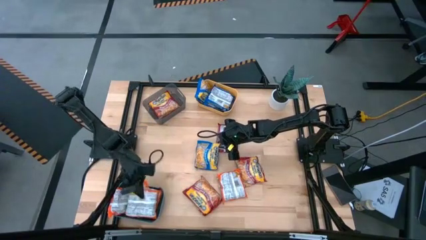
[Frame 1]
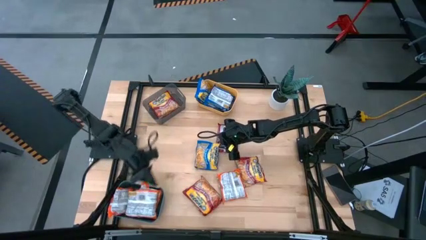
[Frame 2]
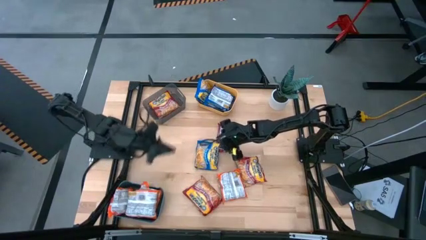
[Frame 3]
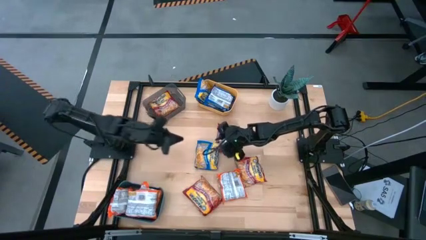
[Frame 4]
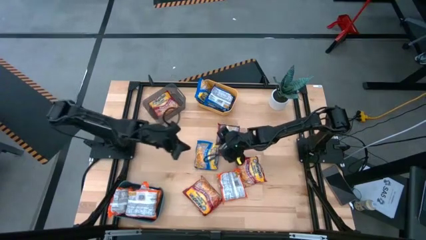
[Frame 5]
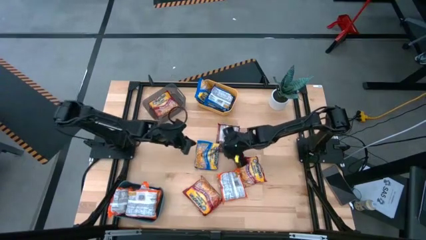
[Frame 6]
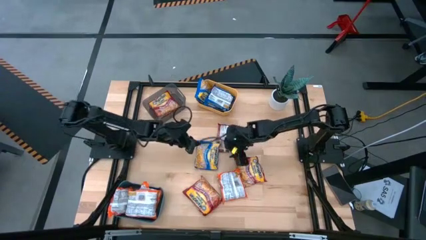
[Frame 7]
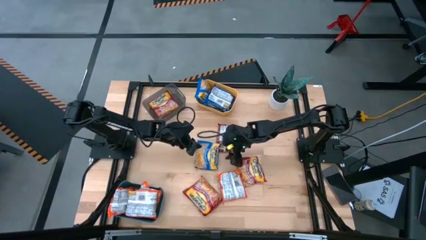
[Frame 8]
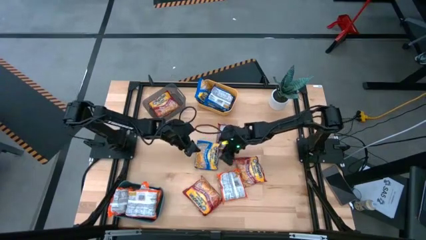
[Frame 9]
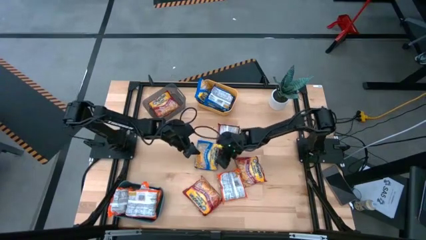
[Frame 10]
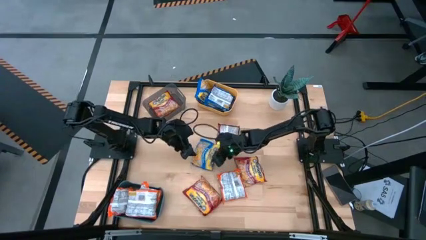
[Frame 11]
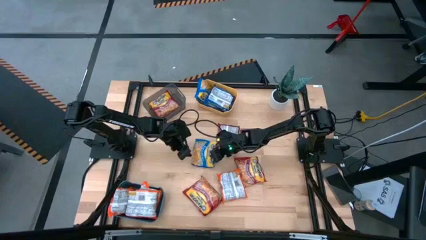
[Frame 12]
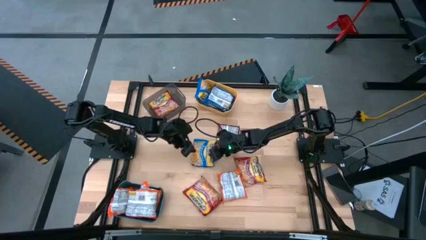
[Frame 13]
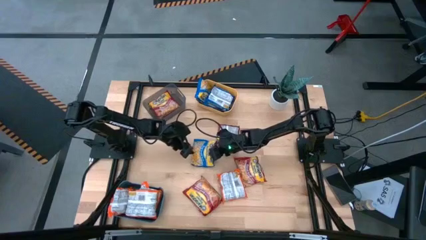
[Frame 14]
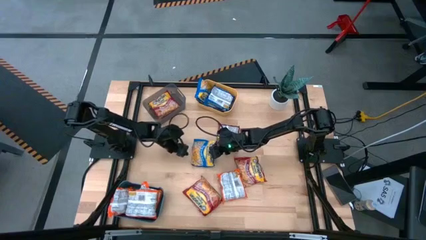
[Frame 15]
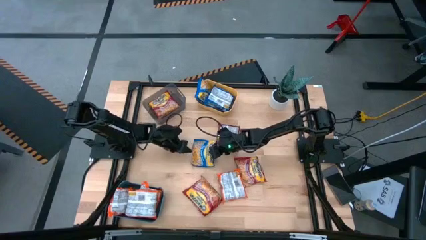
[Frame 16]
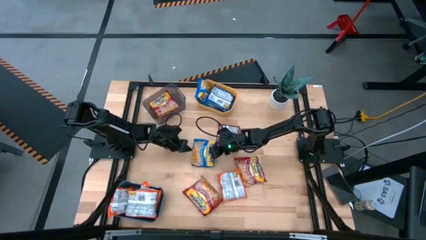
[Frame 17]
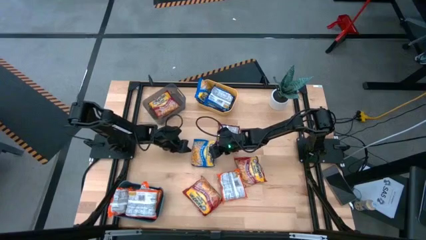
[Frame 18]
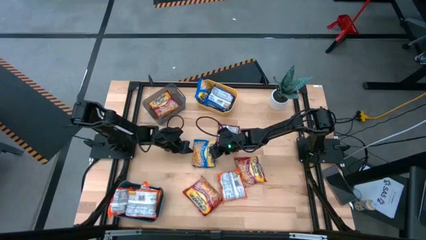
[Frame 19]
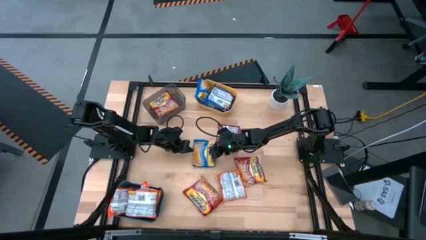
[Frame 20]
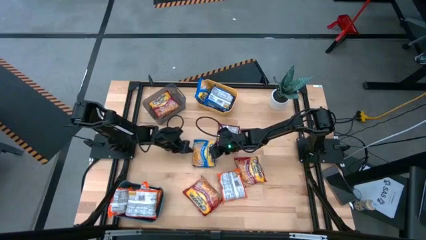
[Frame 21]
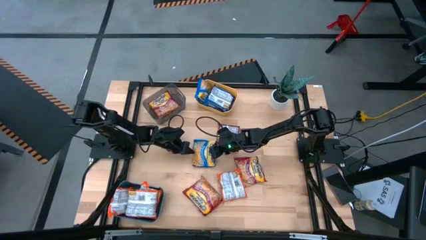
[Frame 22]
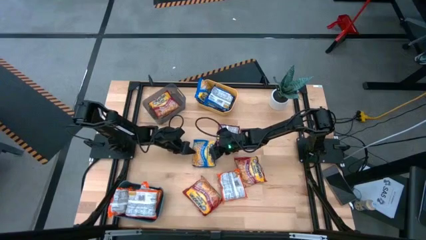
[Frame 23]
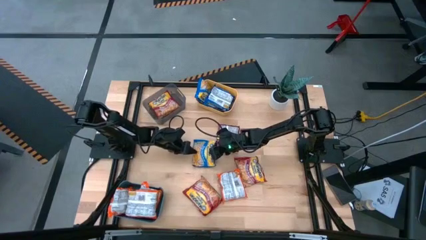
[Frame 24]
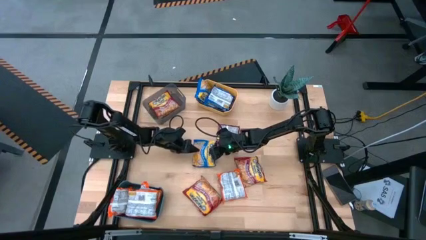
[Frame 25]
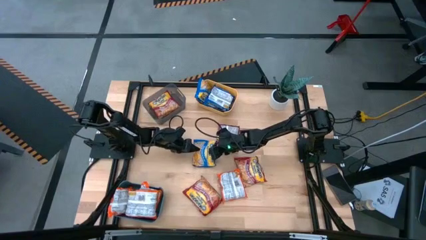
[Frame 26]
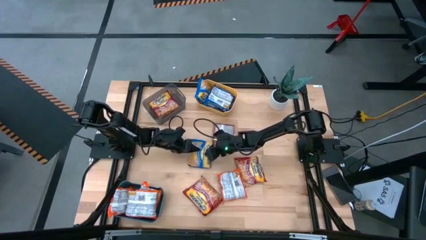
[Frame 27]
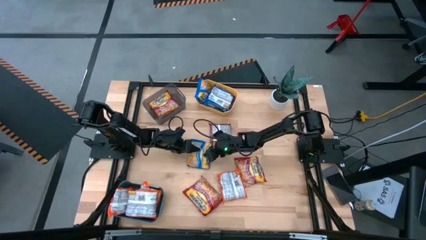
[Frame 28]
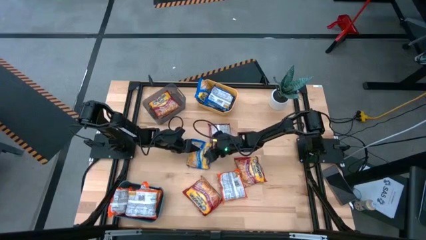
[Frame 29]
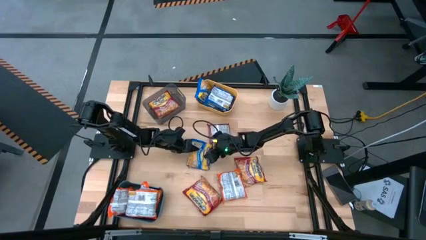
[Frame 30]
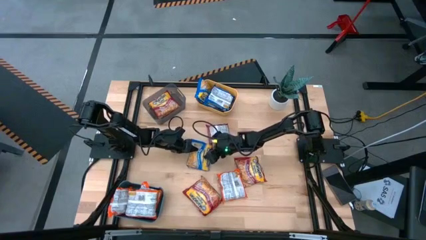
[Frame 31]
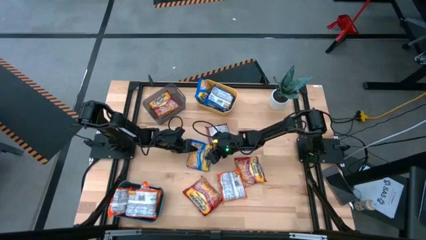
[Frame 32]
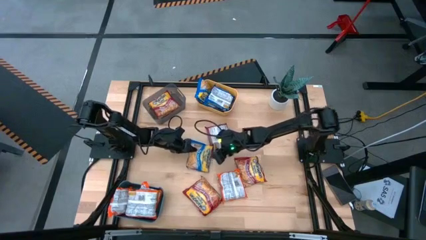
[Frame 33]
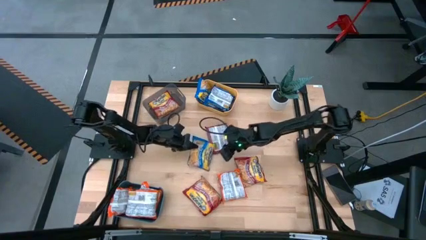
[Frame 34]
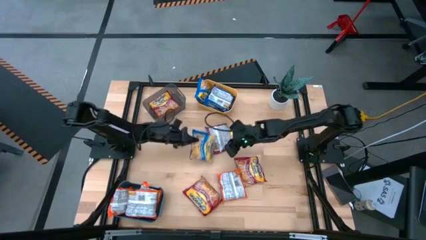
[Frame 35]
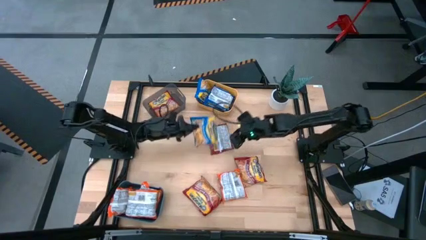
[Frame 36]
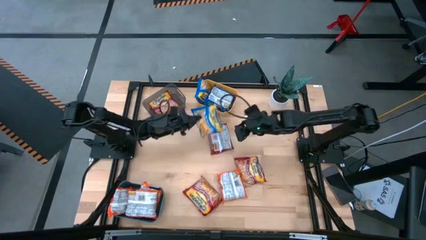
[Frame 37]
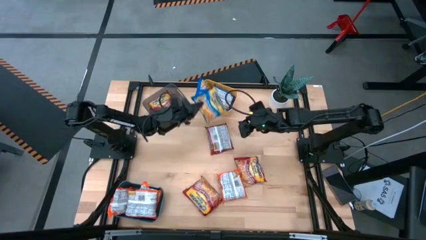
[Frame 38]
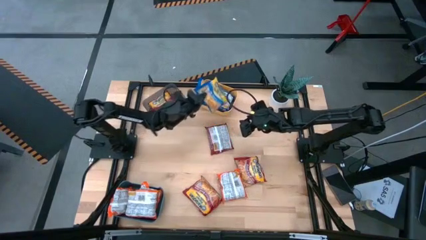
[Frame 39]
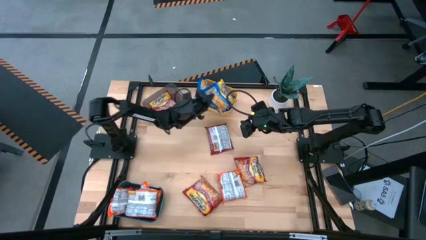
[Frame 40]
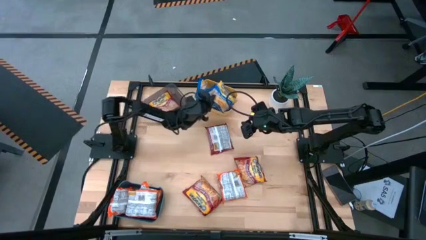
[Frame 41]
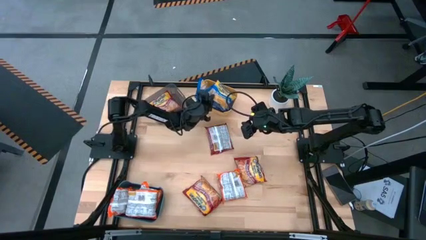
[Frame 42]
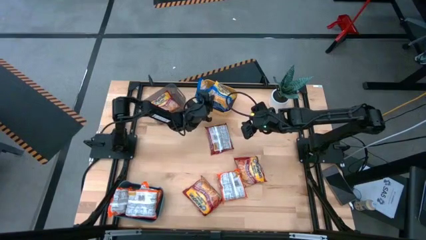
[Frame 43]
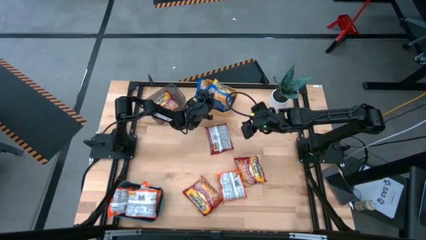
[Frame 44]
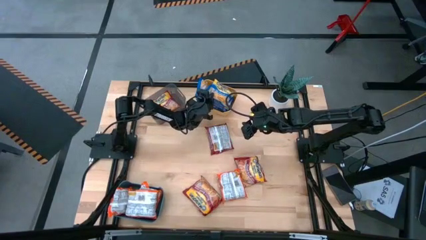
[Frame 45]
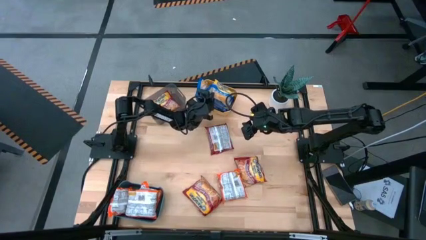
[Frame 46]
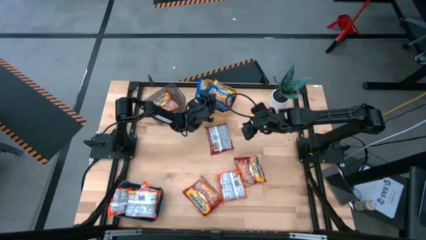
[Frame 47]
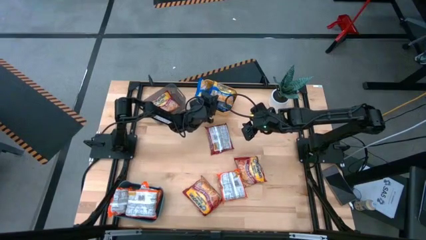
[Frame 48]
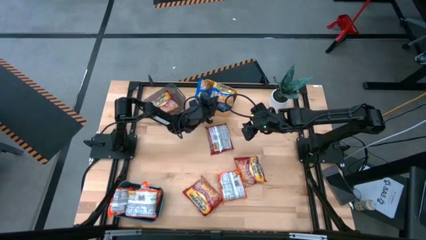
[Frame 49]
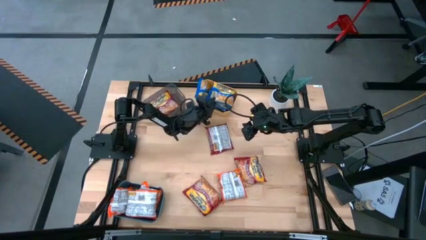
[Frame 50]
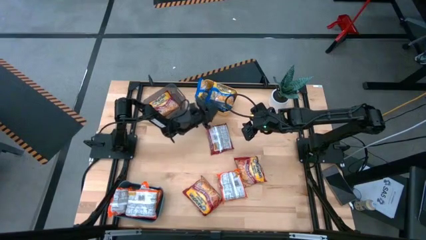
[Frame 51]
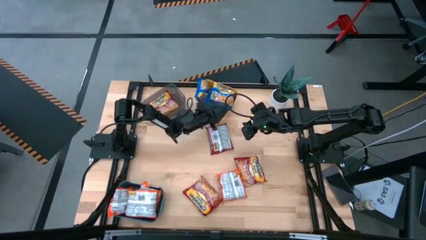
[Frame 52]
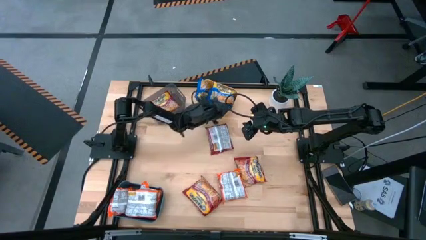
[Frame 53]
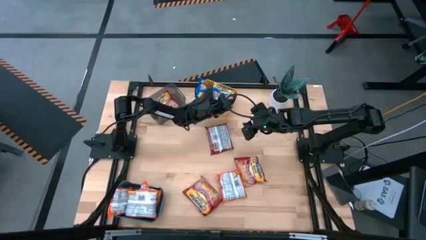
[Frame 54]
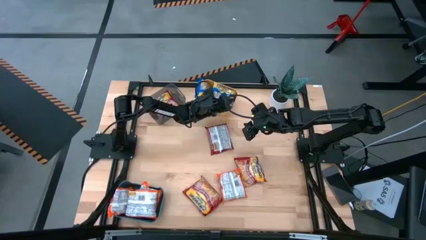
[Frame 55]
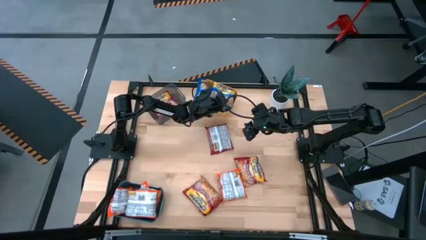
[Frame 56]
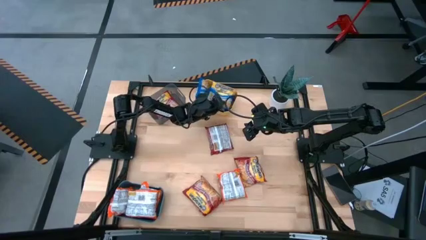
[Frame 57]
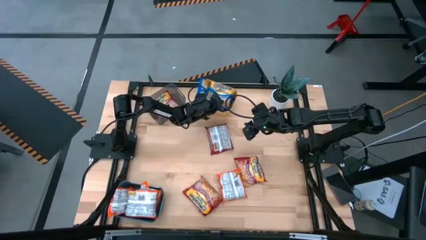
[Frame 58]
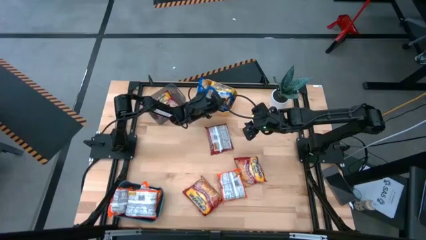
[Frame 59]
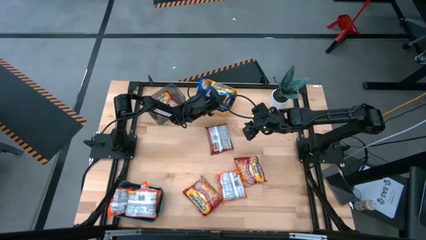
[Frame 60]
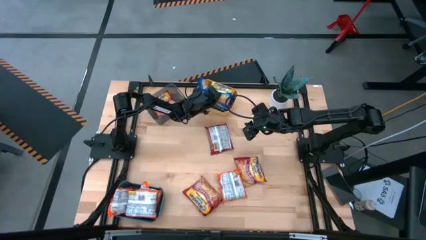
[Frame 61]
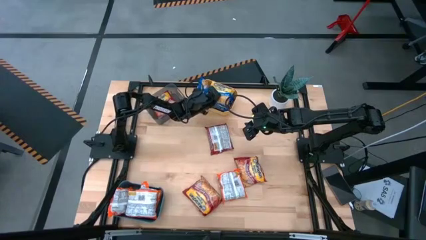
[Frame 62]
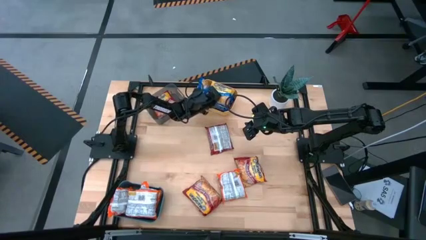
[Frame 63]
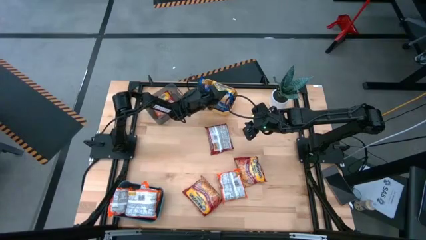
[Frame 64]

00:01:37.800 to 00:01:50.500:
Task: Sort Maruchan noodles
Put the blue noodle pack into the yellow bin

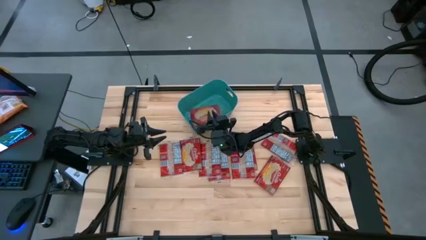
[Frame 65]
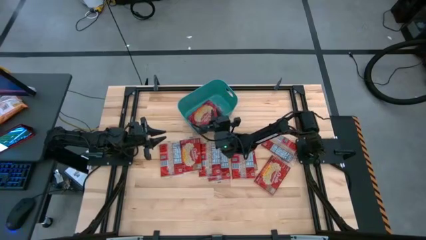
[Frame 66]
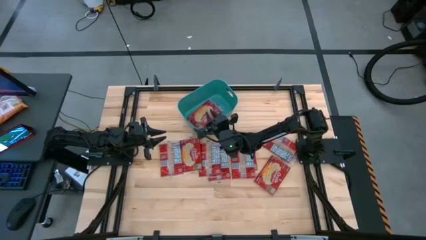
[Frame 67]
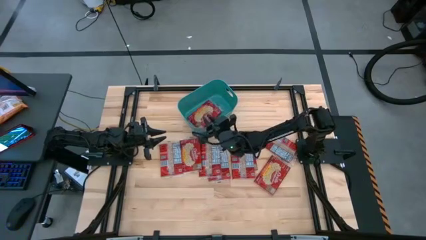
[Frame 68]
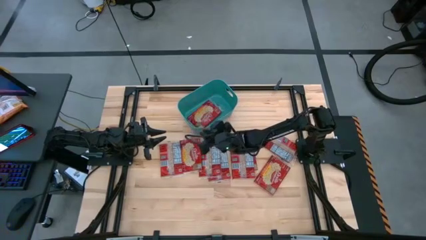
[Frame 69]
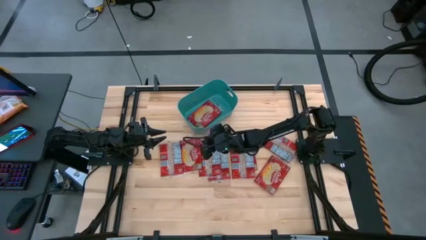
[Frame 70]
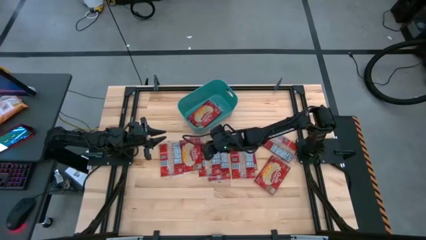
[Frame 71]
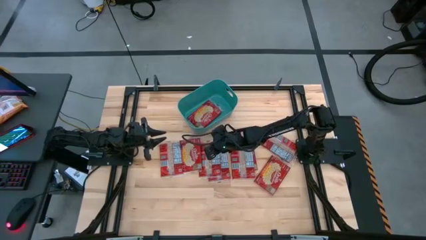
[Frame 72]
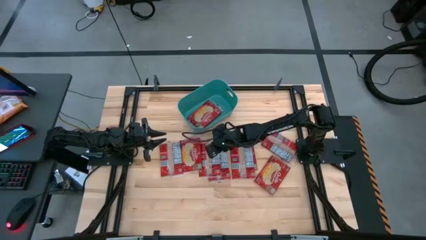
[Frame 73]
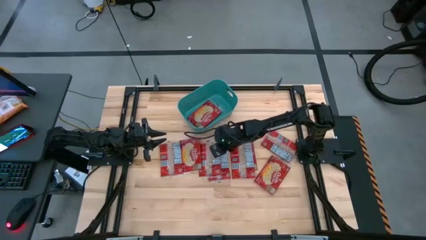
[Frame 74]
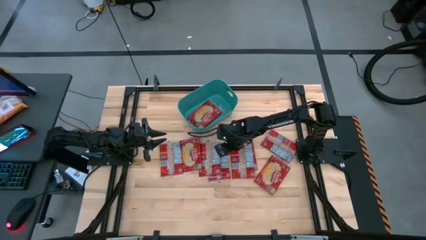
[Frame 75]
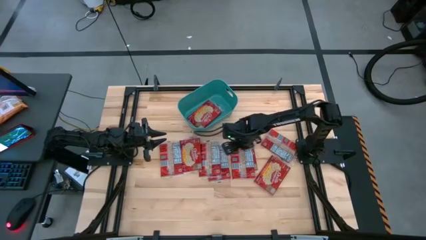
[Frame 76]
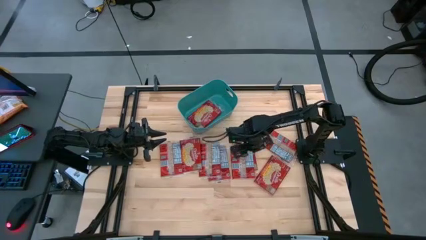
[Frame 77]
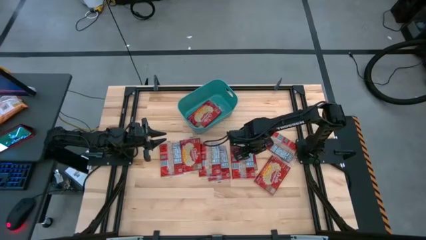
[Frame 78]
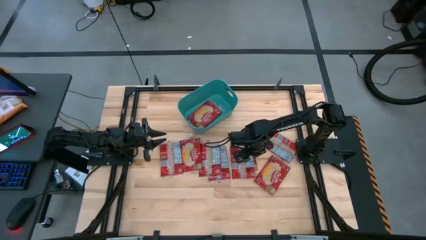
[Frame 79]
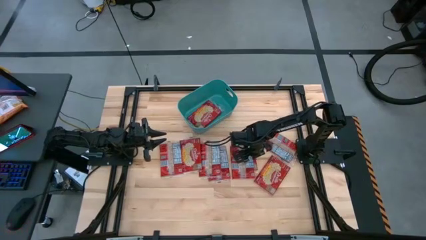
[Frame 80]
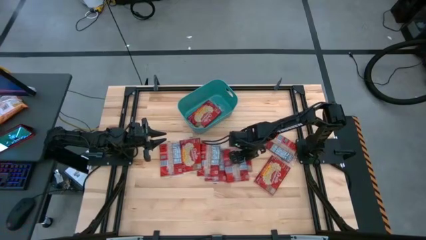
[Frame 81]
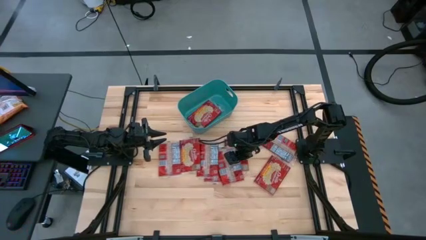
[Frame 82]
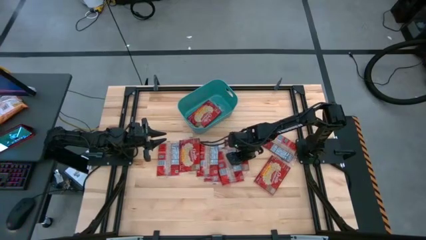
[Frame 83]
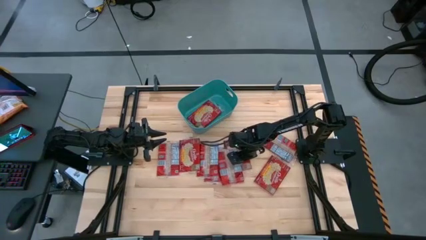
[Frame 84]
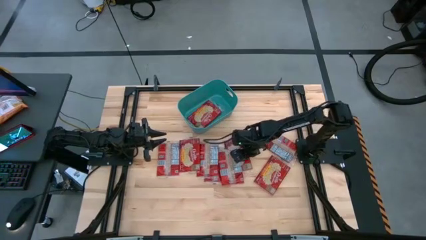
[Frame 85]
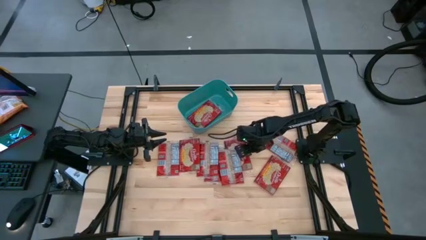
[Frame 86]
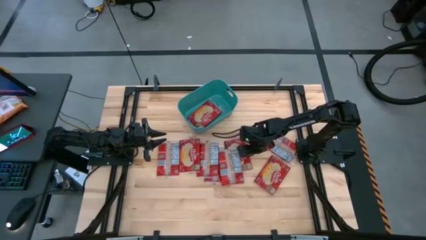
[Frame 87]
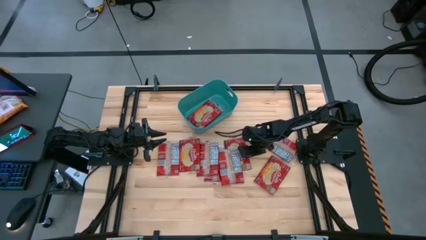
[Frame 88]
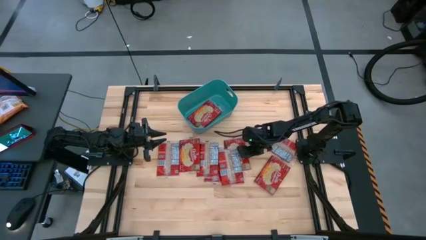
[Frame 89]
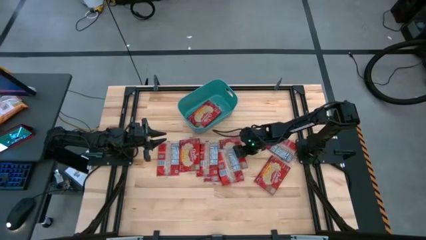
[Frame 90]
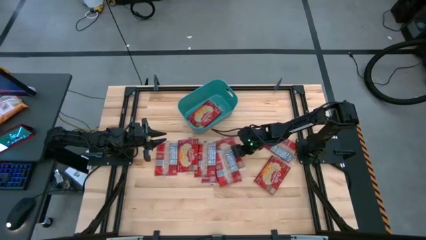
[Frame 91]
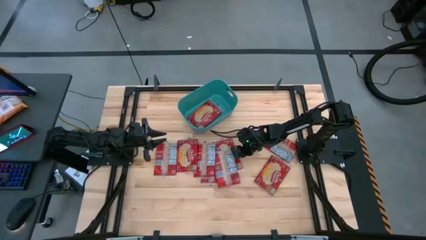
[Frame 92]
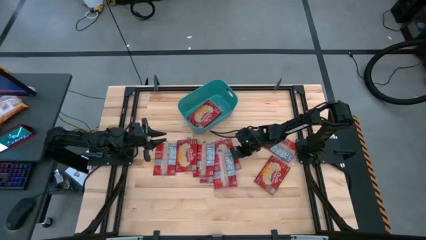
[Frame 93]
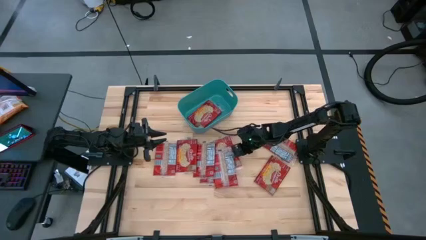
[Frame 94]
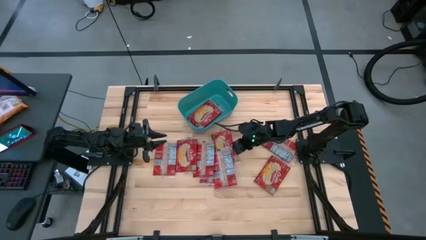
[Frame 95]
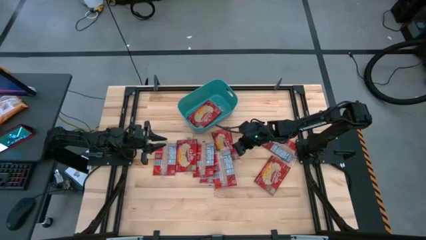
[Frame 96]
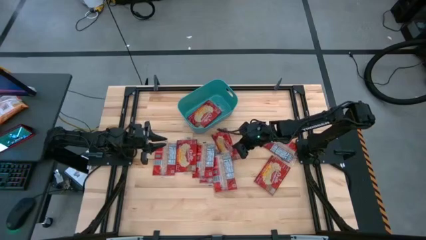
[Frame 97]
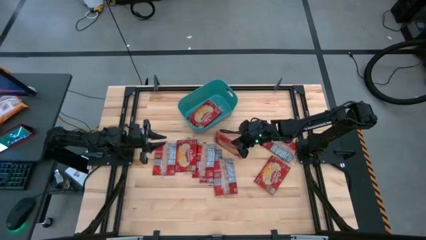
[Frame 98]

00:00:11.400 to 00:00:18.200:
Task: Sort popcorn bags into baskets
Put the popcorn bag into the blue bin
